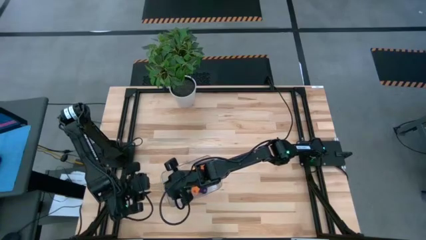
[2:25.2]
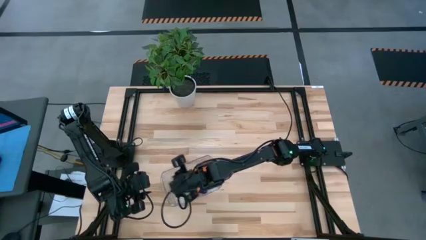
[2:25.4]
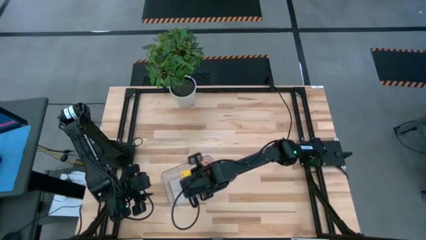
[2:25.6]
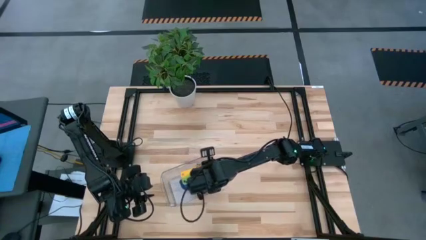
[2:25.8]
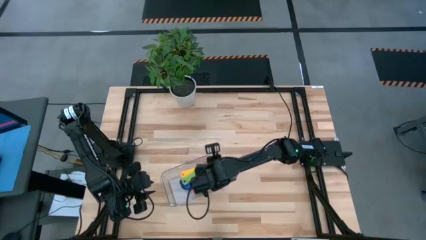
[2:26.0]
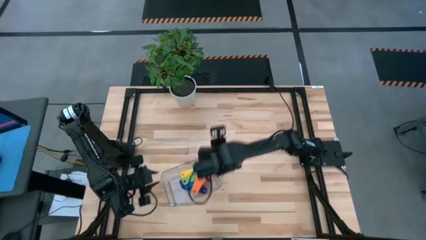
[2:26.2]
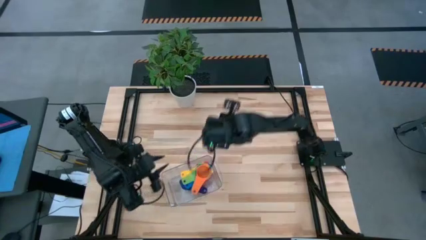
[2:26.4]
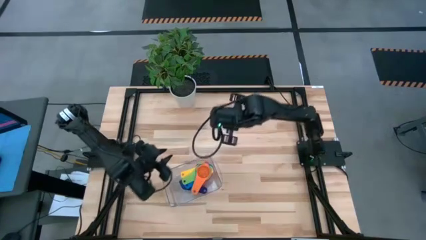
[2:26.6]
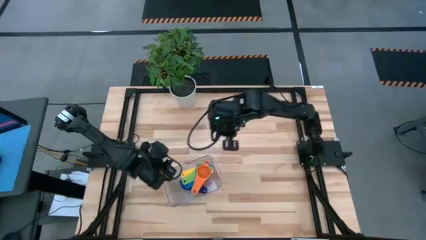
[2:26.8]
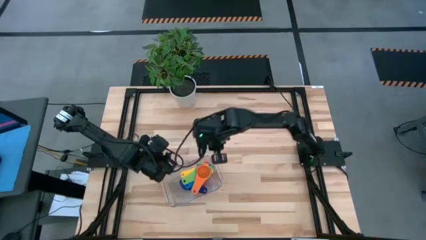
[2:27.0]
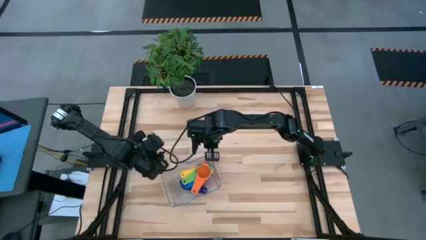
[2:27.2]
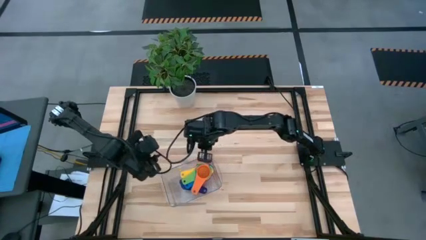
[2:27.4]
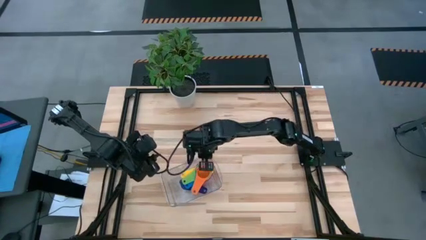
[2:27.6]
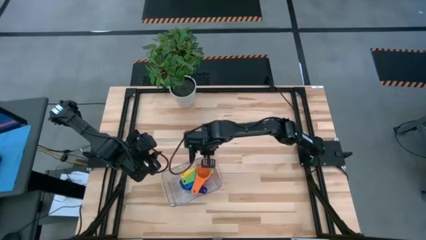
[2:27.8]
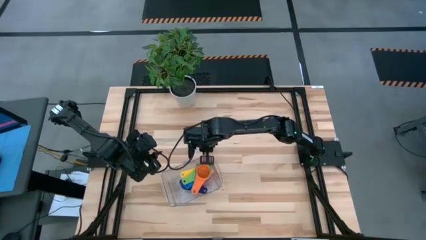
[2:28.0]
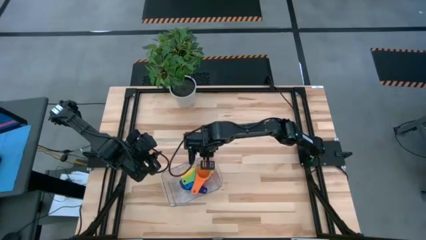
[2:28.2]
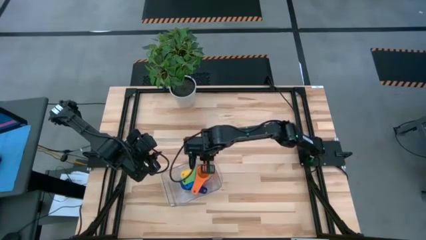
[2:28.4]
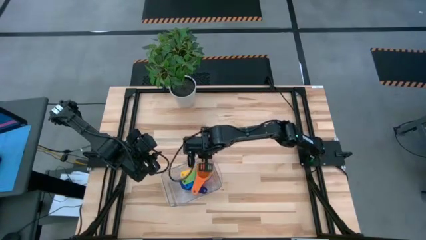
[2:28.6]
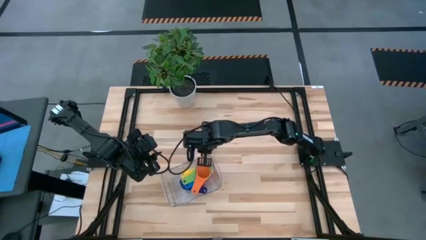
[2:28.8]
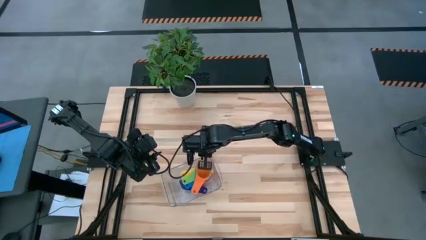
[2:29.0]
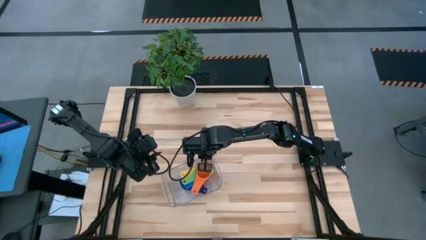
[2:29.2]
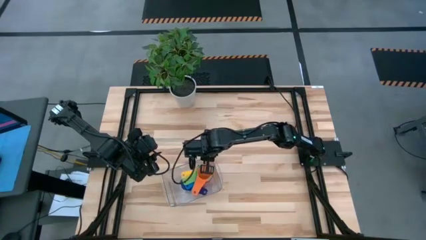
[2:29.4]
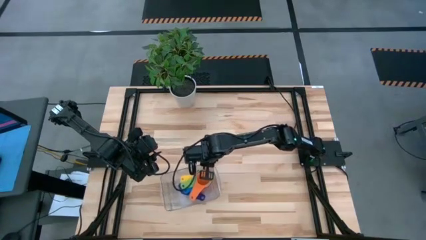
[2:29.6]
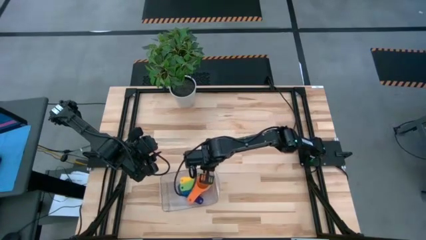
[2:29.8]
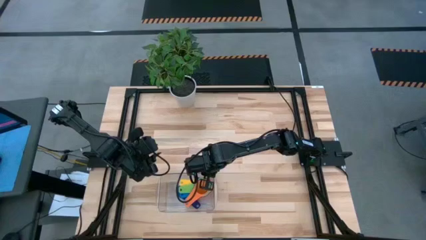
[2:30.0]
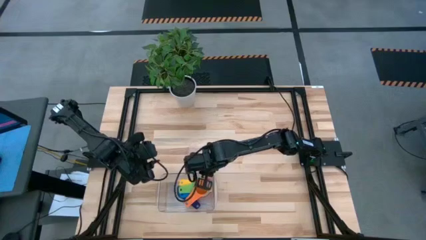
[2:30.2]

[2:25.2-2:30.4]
Task: Nest measuring cups in basket
Adjust the transparent bin on the table

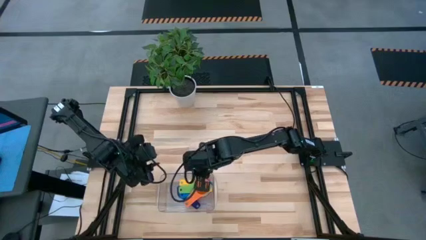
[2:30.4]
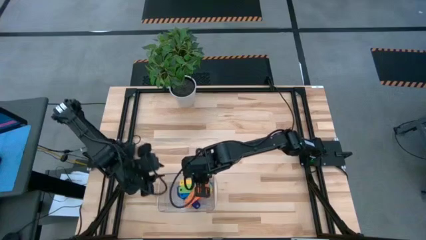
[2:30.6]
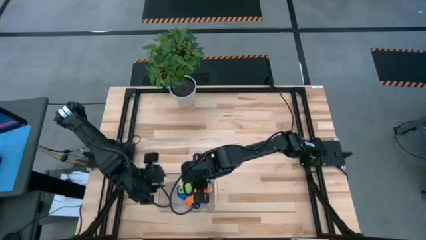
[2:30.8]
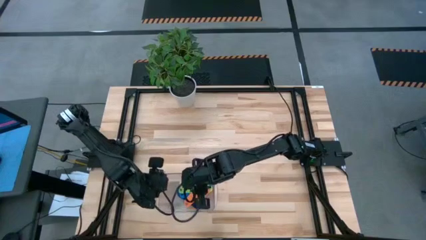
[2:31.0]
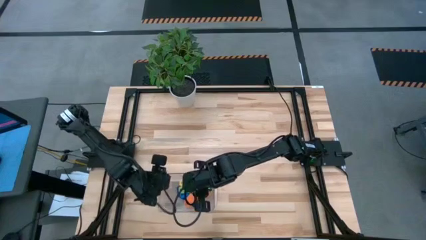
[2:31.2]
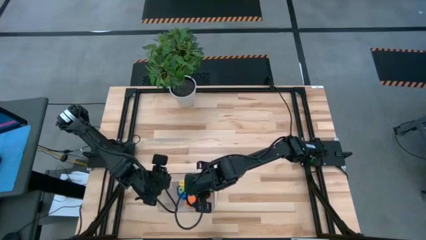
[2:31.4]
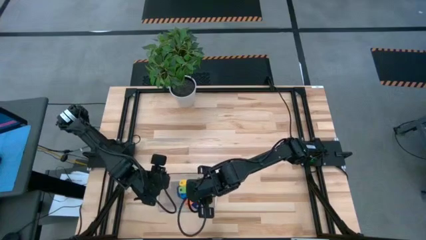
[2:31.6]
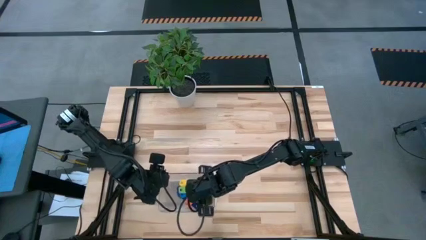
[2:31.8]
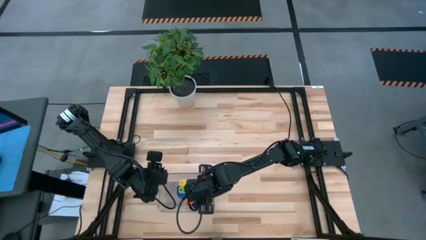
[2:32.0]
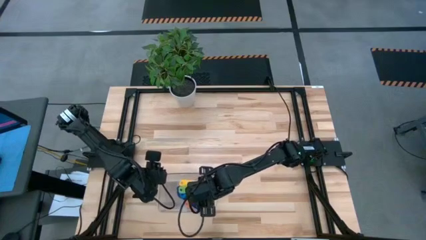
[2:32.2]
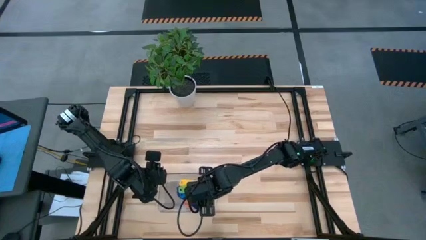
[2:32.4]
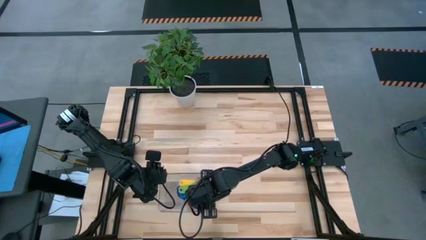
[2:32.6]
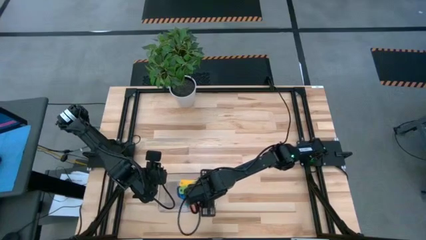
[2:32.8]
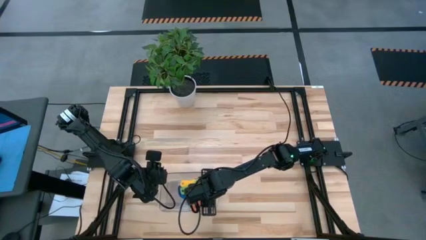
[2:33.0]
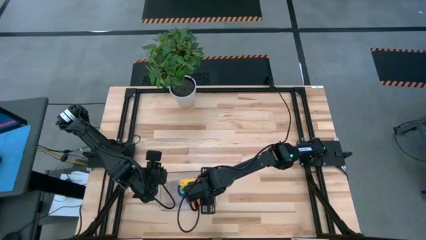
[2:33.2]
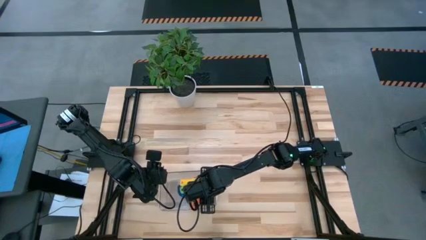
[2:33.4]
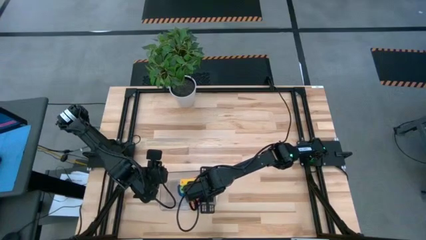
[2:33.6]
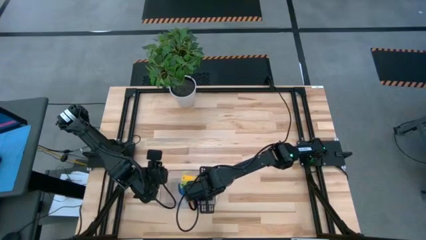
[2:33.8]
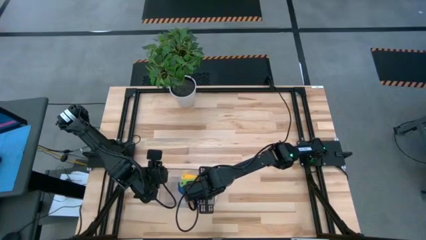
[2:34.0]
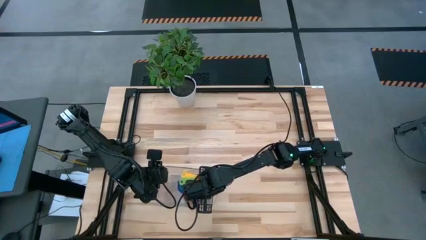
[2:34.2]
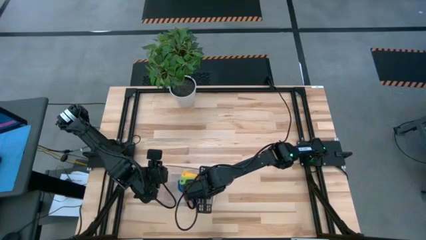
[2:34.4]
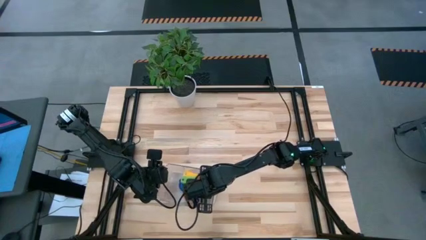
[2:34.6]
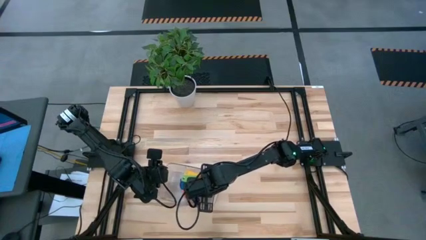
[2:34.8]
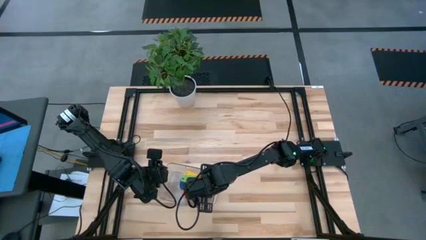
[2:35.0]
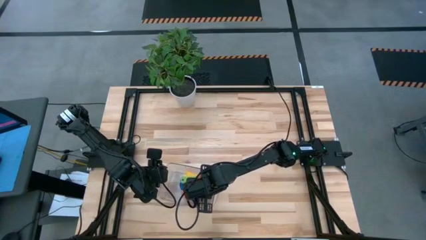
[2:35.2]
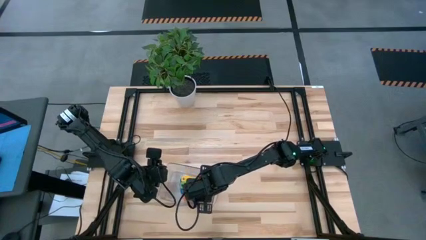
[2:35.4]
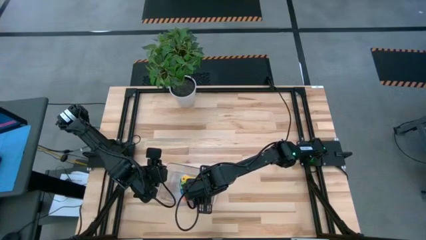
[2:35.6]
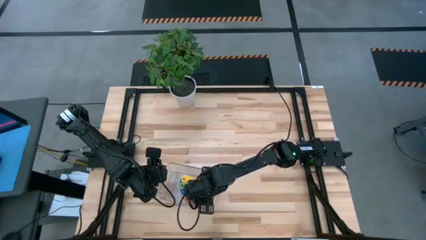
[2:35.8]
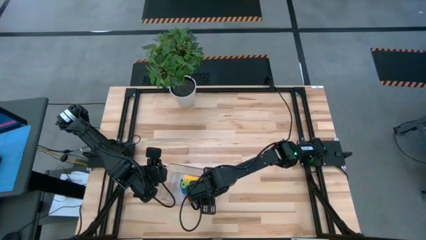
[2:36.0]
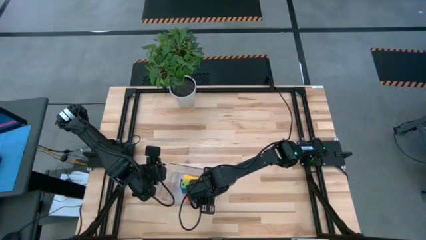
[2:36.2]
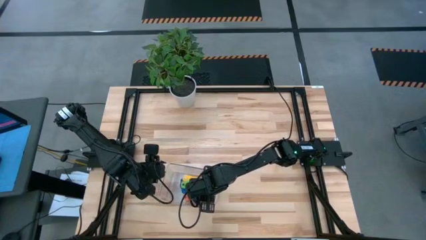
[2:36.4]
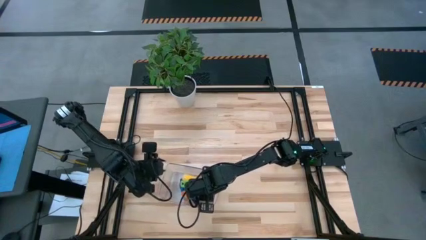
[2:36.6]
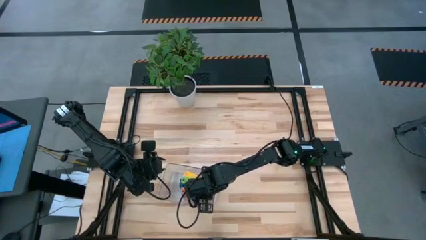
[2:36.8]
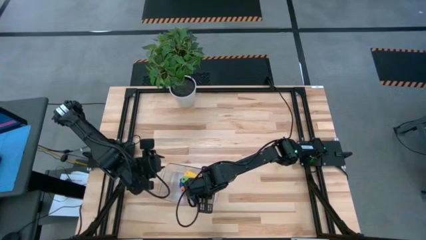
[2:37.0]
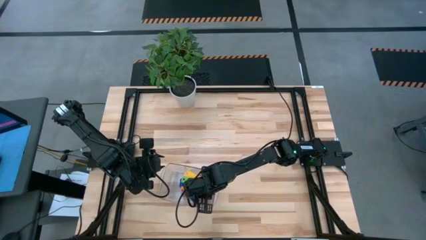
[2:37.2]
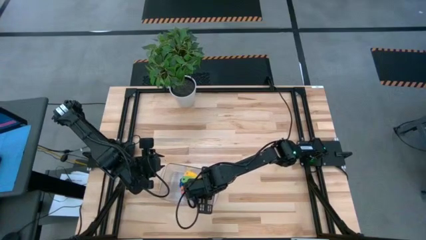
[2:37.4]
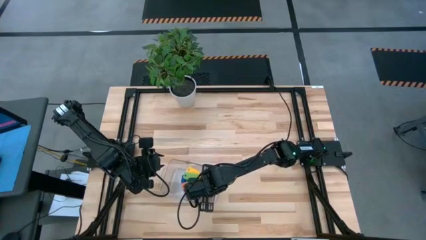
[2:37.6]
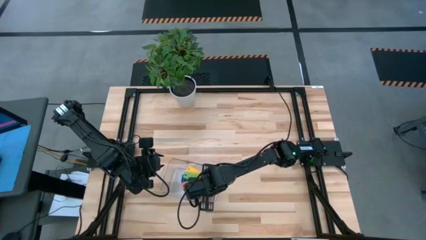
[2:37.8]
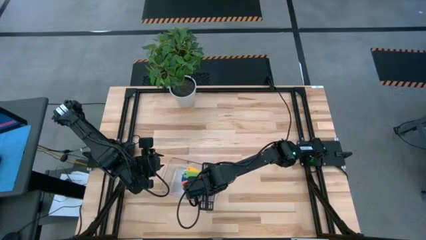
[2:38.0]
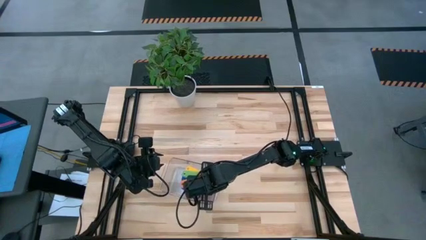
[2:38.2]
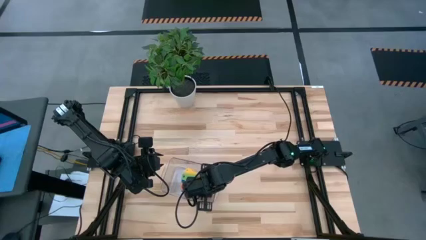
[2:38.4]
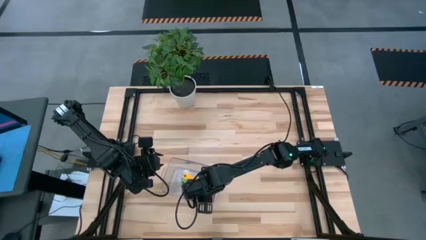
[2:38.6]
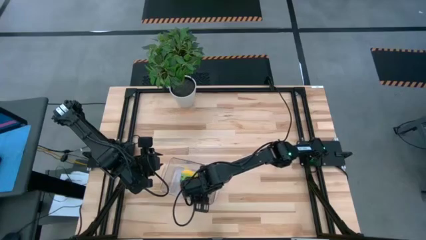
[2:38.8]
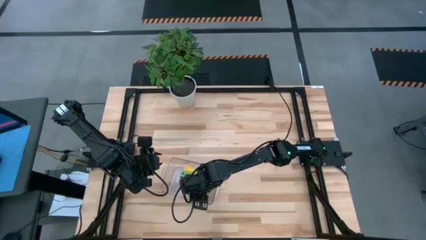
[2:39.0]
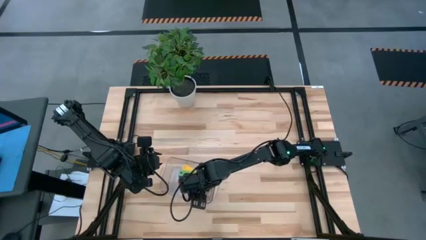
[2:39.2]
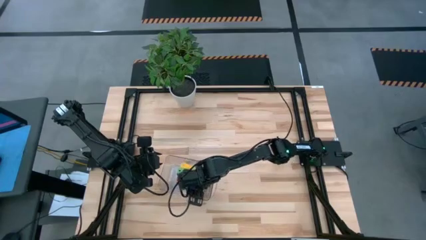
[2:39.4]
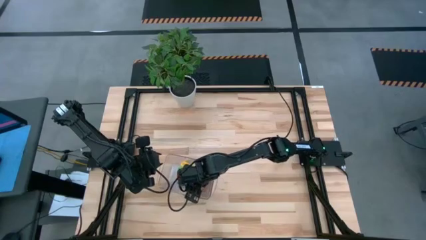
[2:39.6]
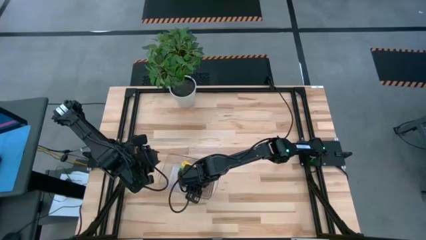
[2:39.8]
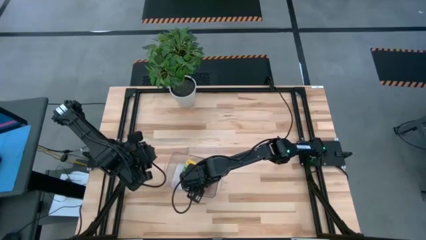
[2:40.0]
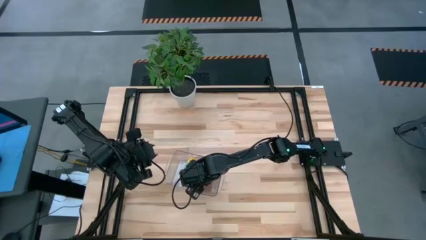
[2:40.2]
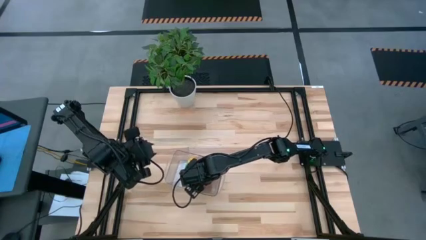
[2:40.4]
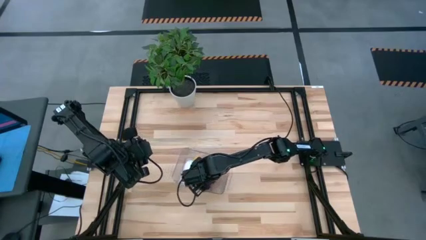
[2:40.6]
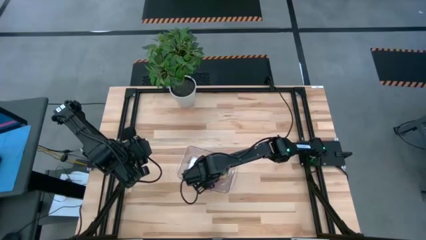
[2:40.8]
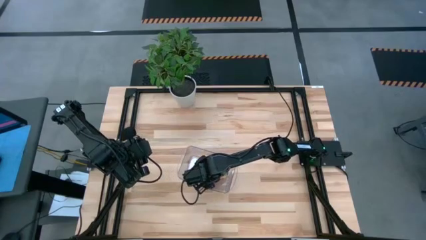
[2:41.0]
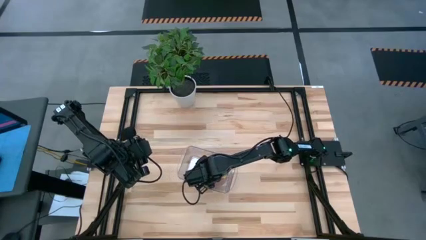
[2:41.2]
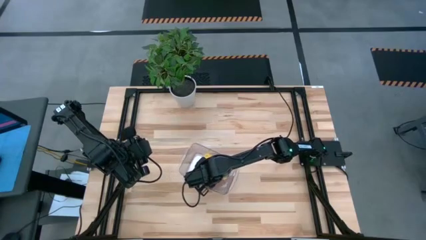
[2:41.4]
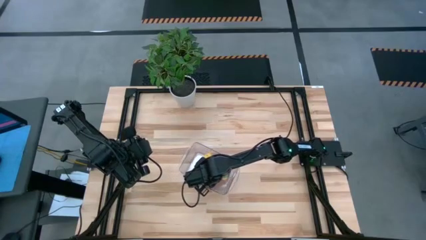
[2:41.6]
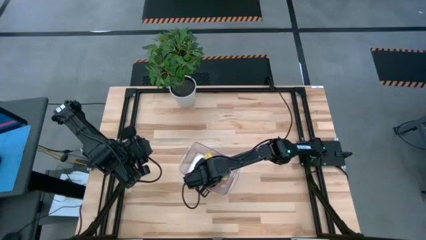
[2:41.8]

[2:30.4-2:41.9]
Remove the colored stacked measuring cups from the transparent bin

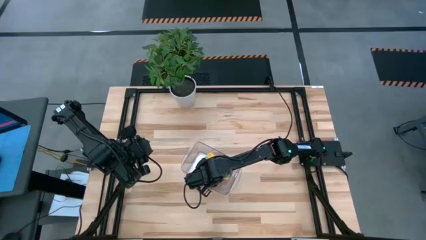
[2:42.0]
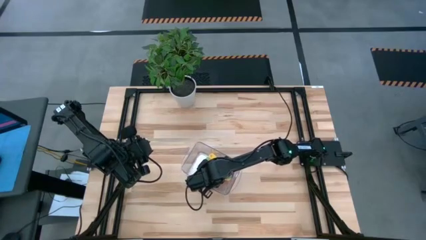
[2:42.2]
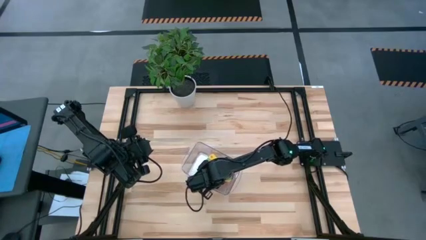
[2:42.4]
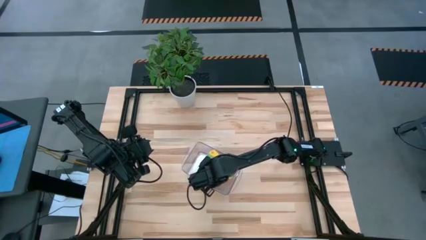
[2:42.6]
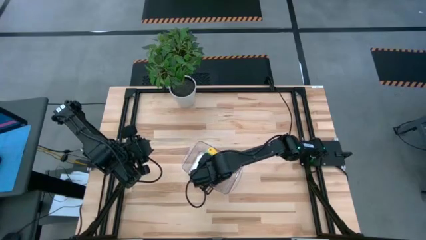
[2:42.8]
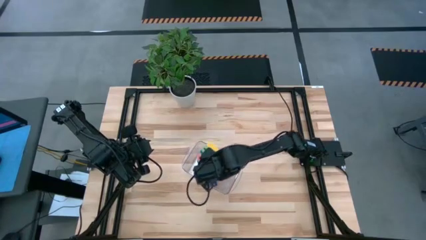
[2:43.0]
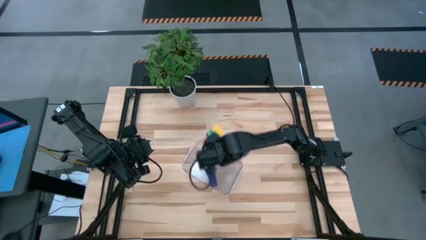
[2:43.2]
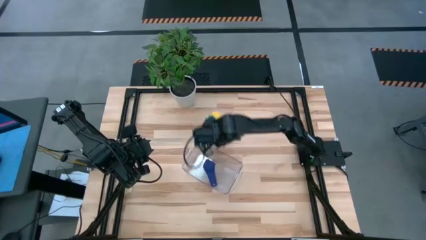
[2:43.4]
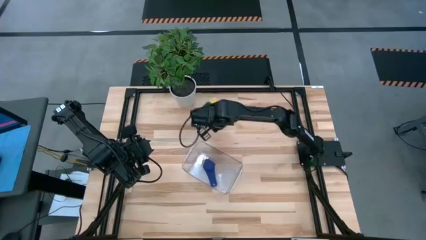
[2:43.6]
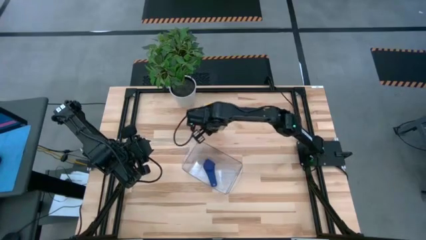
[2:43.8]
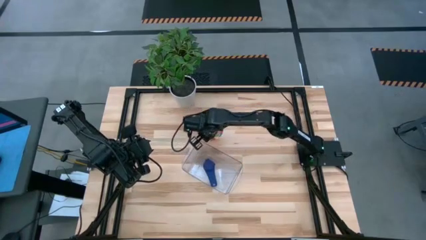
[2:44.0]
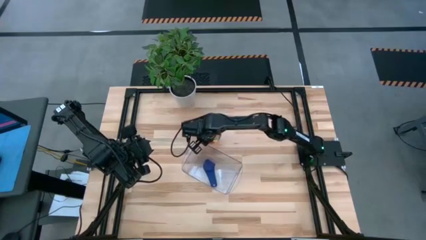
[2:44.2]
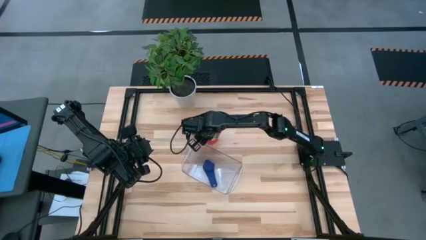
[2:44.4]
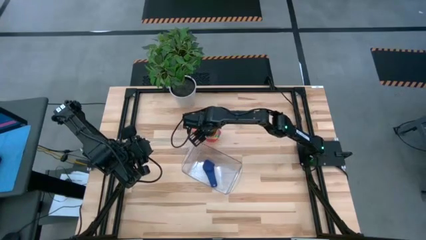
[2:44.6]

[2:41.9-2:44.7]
Remove the colored stacked measuring cups from the transparent bin
